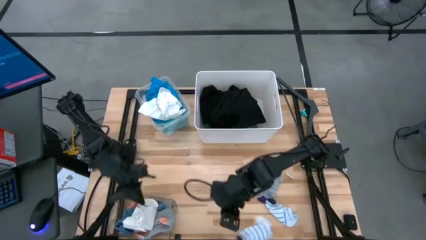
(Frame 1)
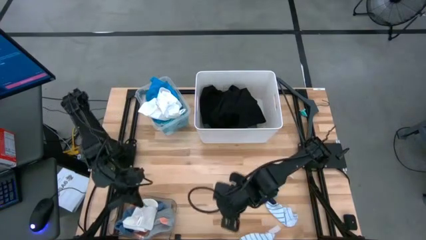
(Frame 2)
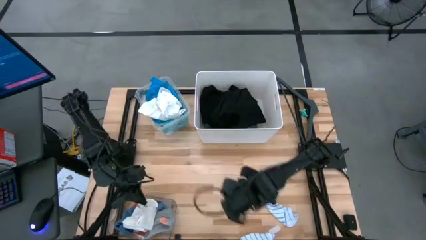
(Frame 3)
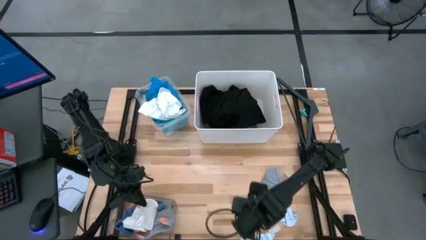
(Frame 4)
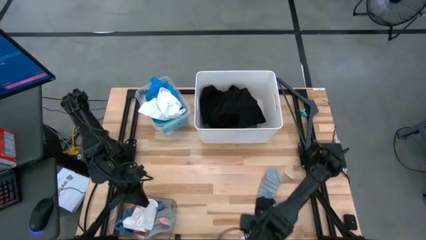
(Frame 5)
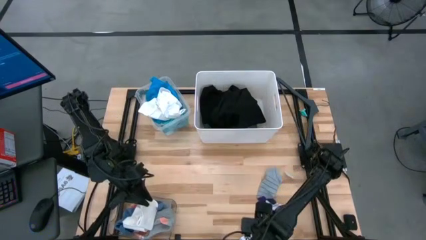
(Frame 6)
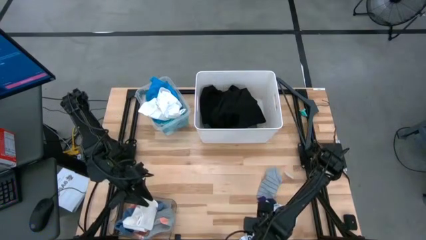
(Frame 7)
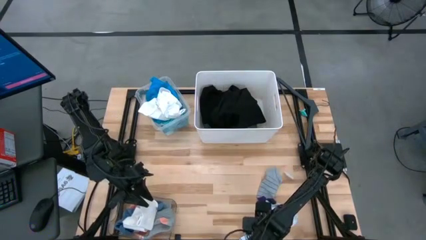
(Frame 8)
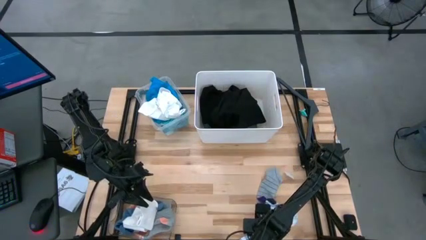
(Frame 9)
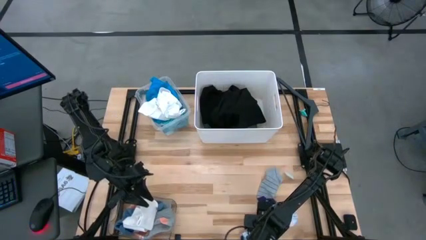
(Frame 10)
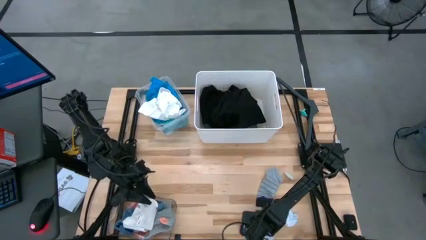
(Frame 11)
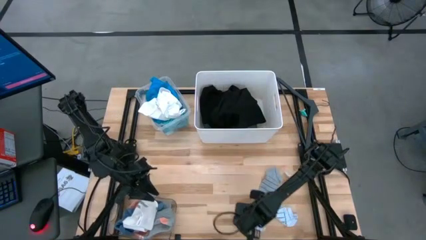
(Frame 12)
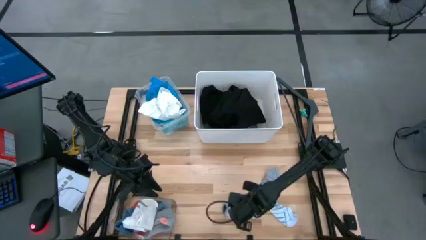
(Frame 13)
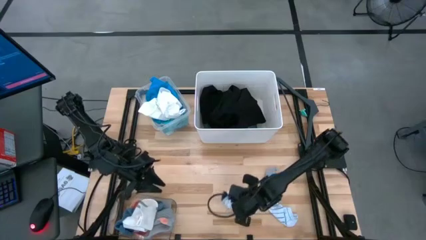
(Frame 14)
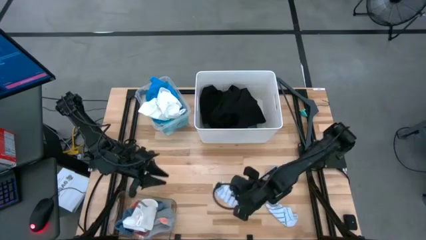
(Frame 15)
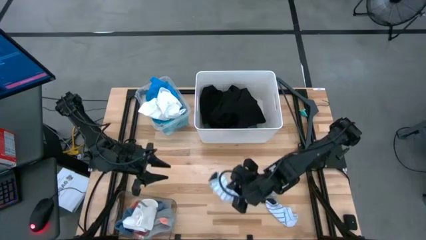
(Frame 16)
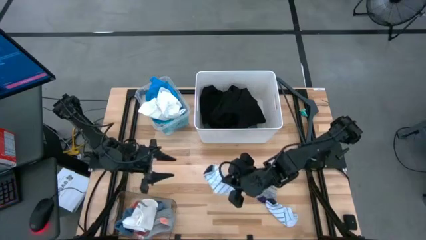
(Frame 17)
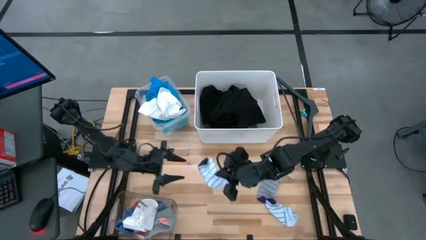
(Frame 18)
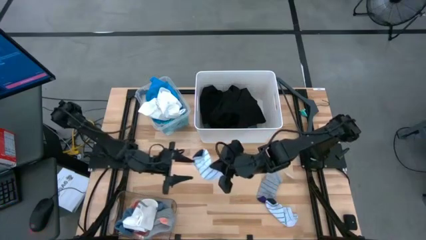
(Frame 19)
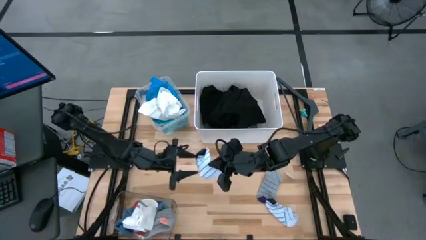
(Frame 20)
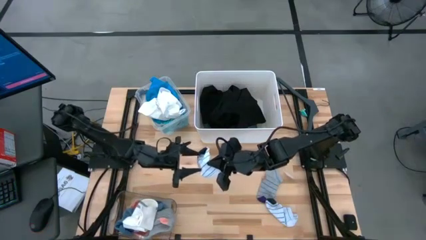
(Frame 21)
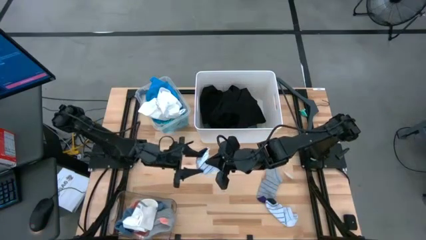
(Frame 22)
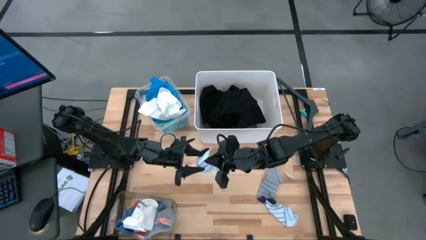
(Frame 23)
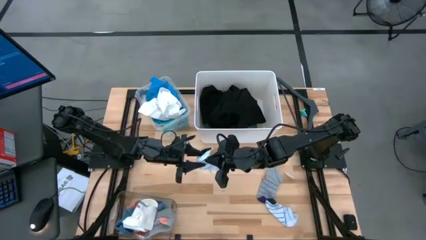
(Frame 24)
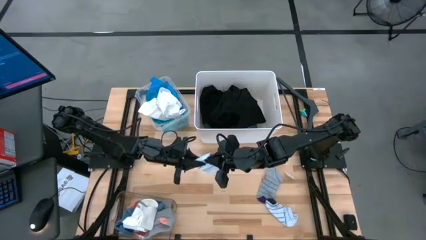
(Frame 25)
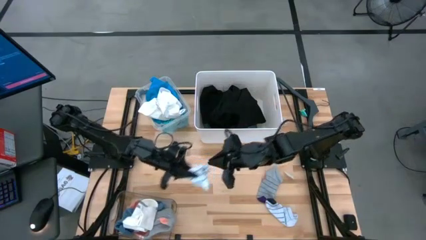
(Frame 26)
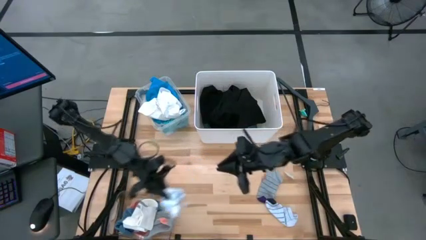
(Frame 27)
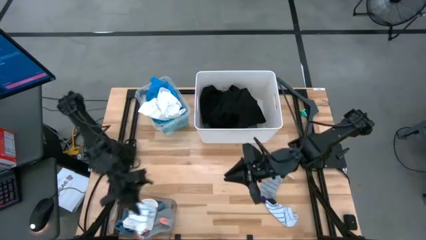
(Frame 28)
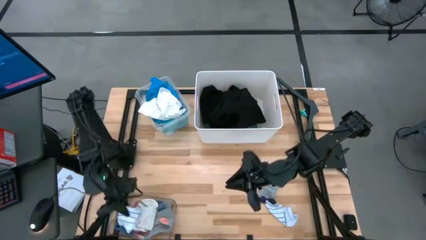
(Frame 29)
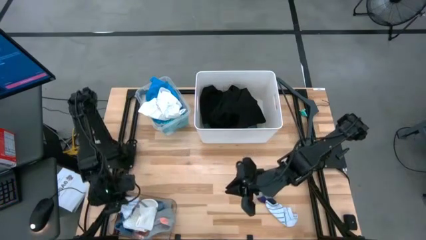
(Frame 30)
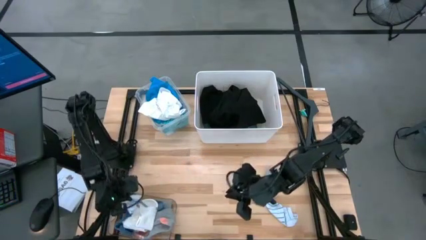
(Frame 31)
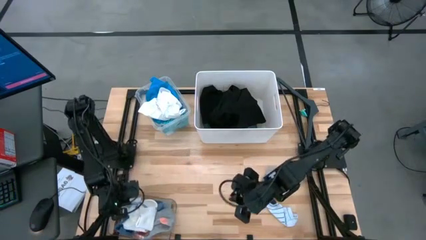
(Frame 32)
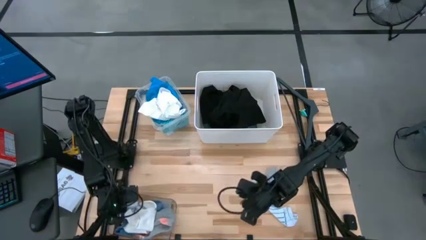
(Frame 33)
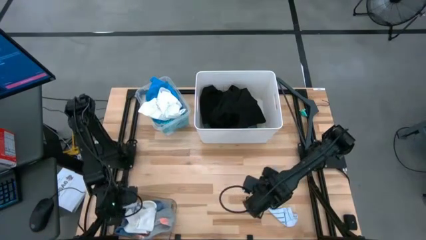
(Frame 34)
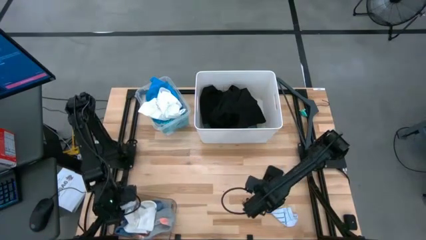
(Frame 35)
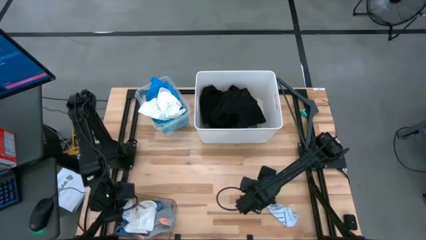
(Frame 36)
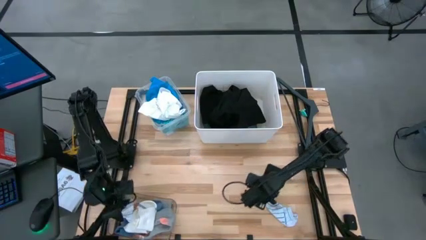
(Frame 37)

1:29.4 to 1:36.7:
Task: Pick & Place Cloths
Put the top white sock into the transparent bin

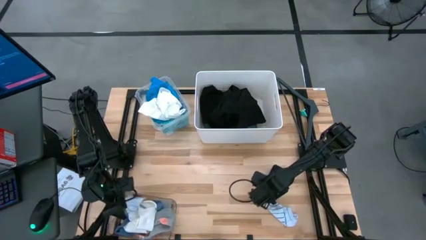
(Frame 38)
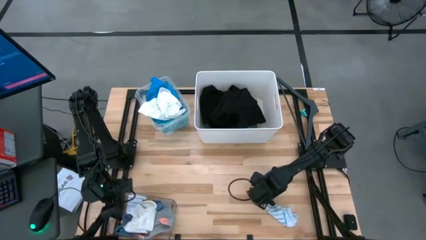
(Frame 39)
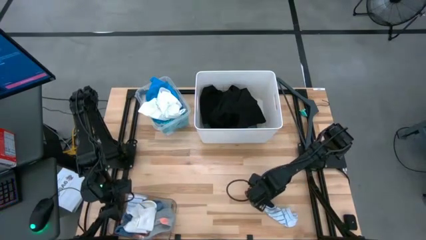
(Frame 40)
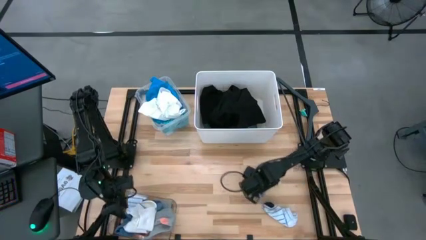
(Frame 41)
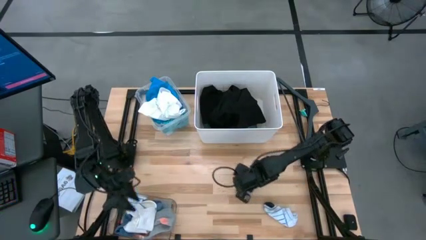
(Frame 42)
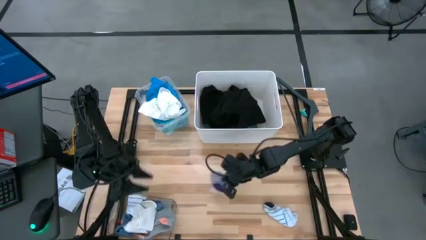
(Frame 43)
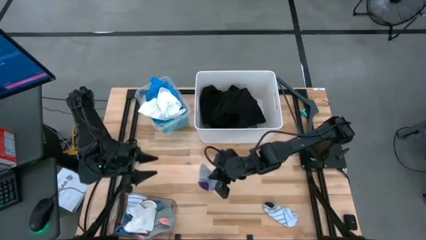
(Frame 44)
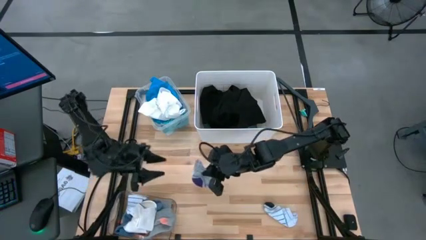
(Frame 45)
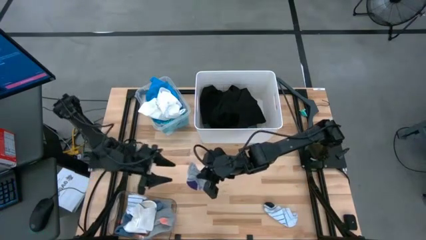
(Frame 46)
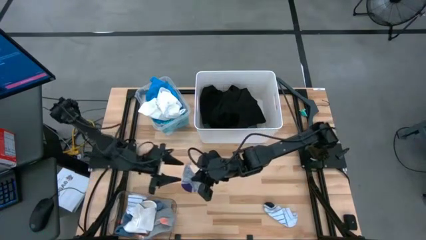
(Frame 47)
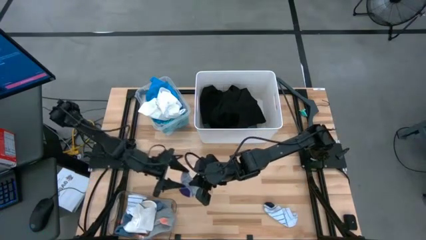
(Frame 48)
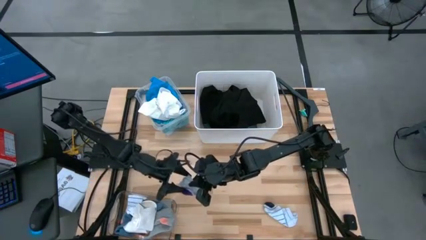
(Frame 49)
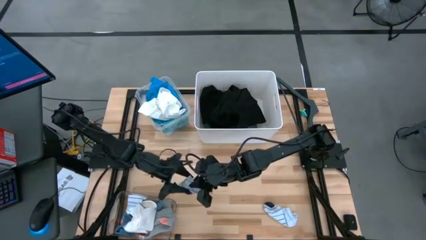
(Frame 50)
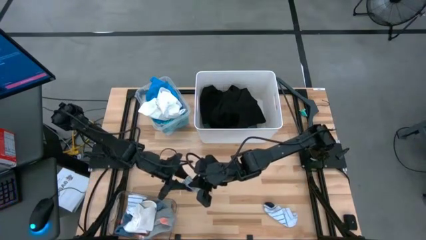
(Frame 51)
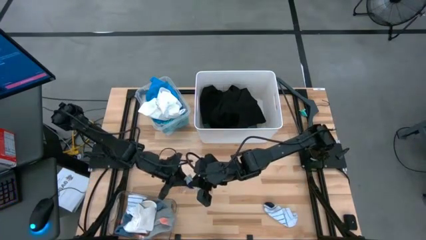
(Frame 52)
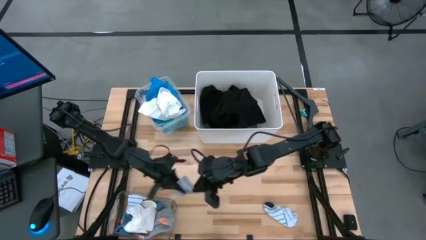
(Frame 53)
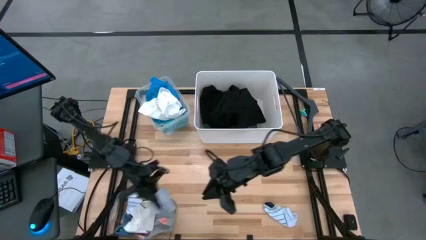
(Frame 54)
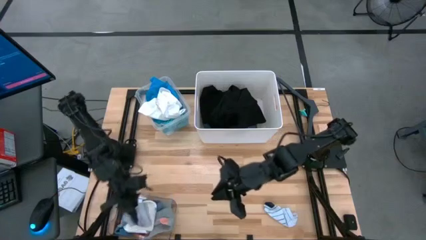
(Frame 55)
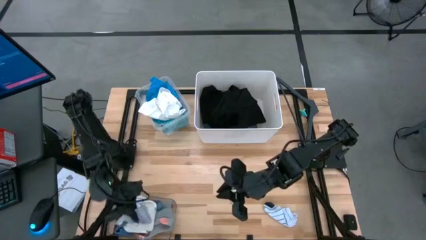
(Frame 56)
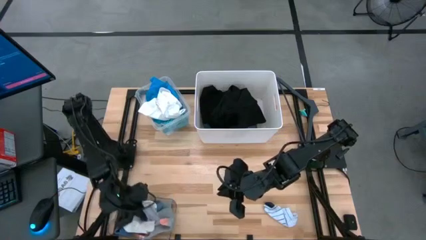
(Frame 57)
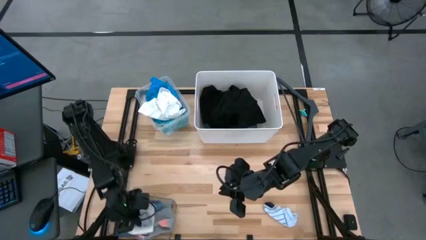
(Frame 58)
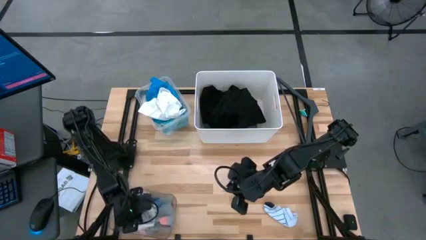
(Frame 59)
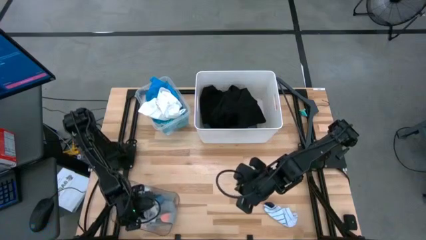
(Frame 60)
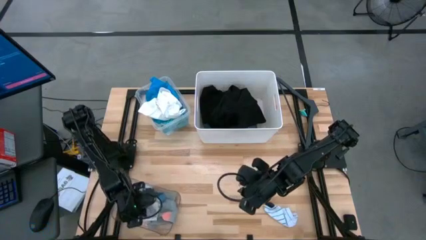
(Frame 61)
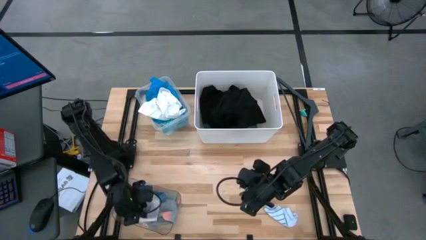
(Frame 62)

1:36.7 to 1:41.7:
Put the gray sock into the transparent bin

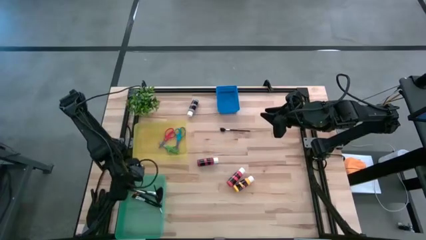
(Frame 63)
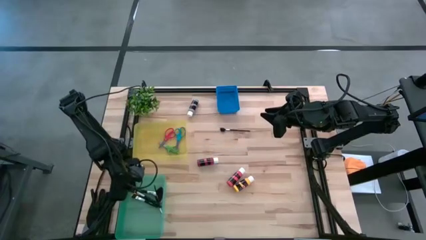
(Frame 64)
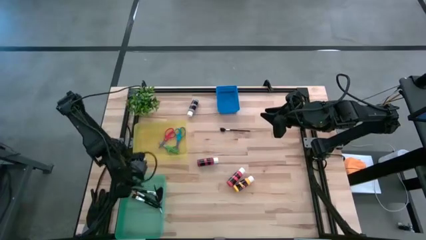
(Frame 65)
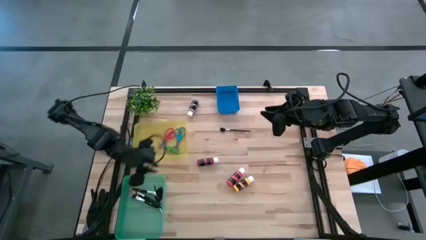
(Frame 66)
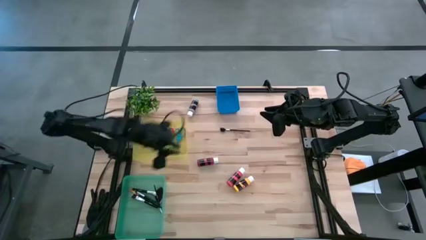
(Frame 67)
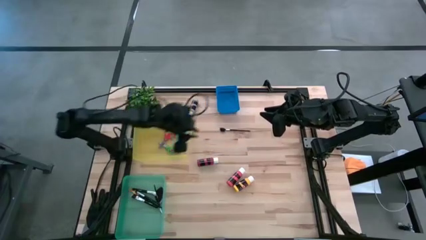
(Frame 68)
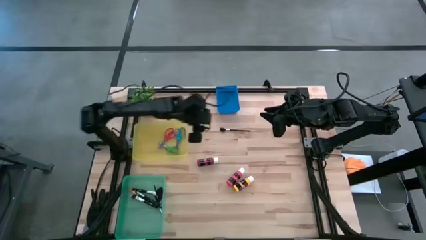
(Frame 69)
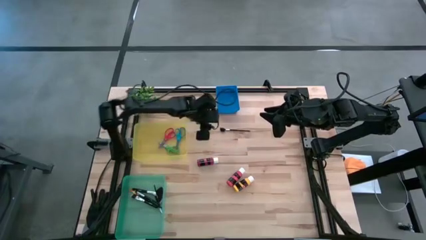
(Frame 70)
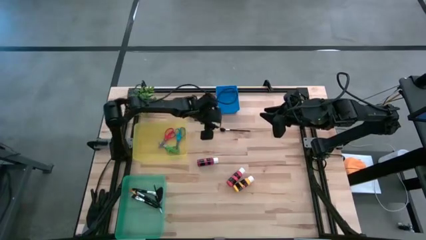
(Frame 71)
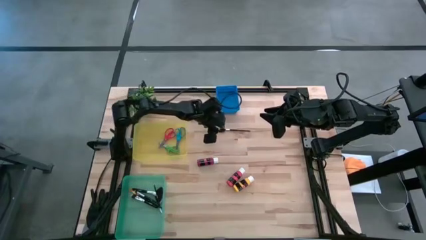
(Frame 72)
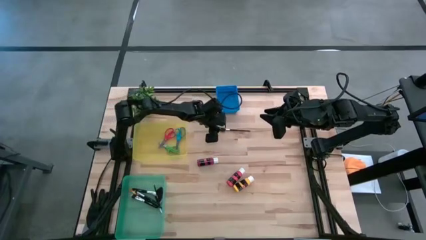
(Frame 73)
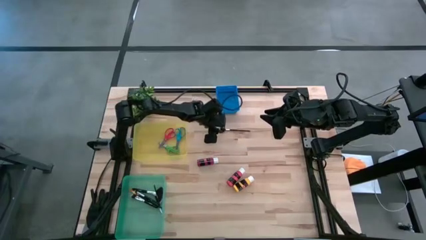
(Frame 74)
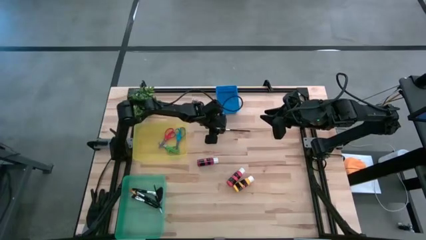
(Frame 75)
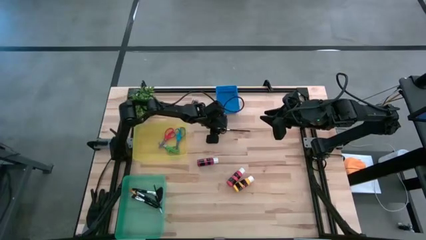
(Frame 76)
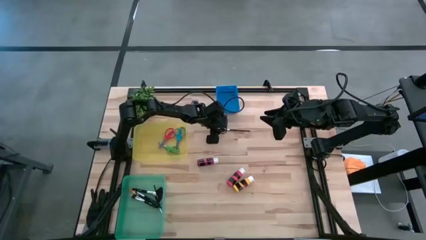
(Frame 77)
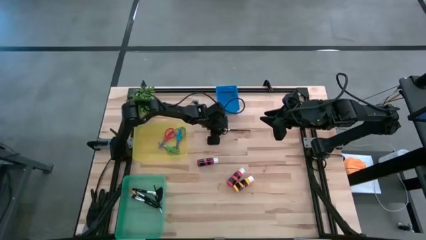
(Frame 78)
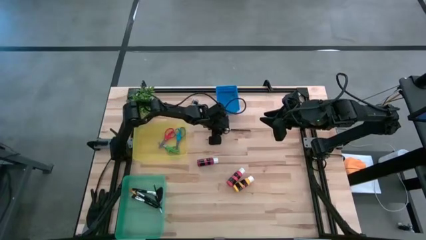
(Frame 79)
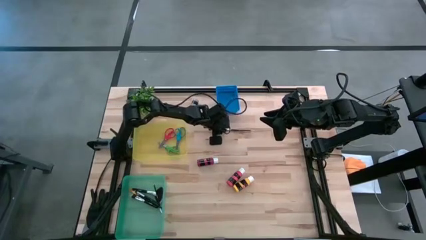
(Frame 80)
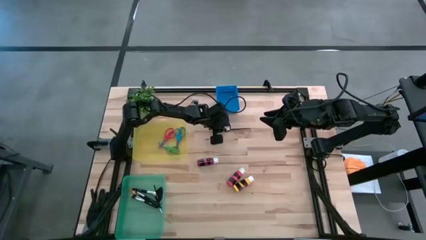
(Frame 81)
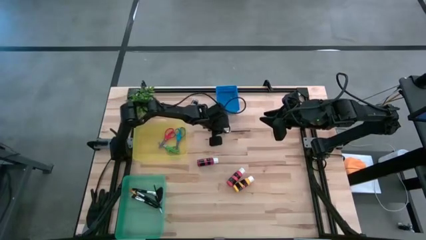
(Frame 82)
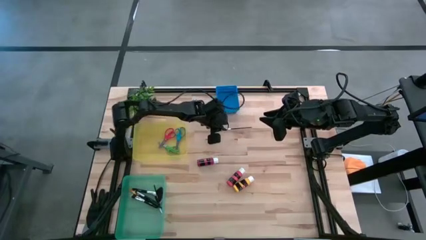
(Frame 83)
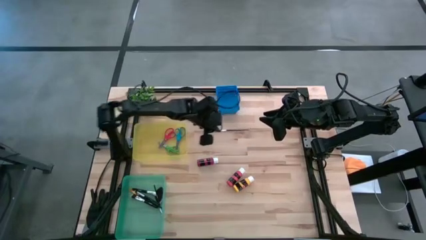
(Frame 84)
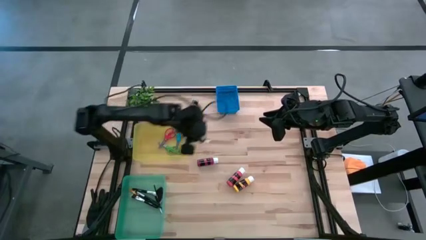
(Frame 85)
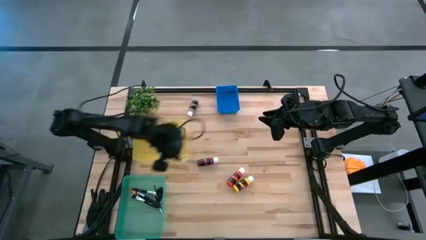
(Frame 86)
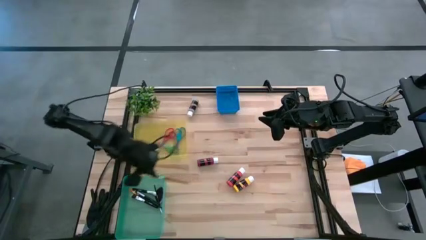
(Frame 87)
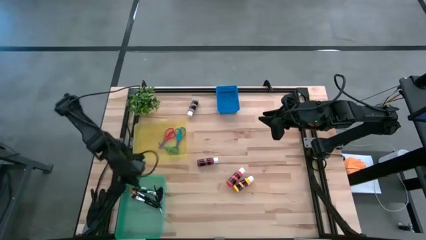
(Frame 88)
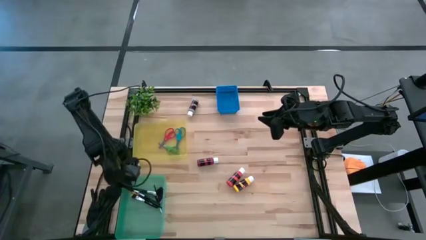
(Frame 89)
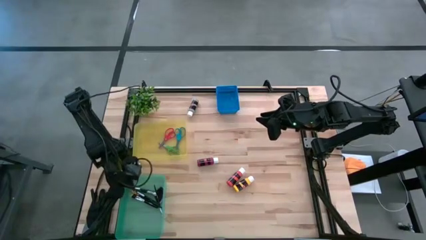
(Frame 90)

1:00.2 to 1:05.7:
Task: Pick & Place Paint Supplies
Put the black paint brush into the blue bin
